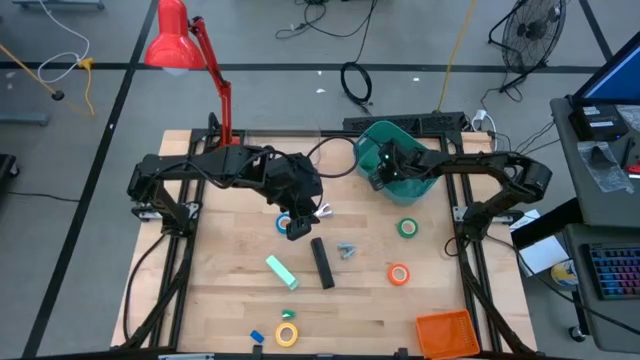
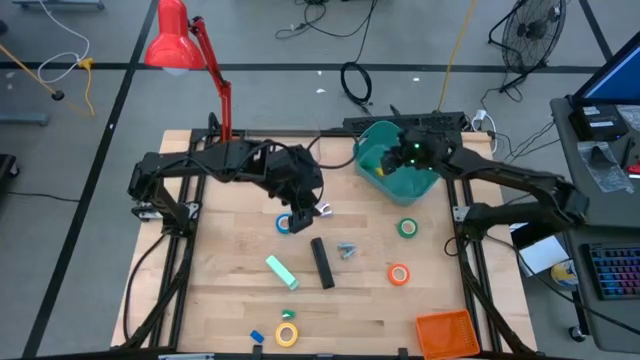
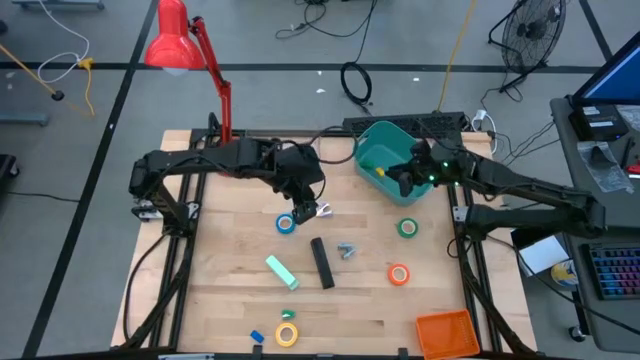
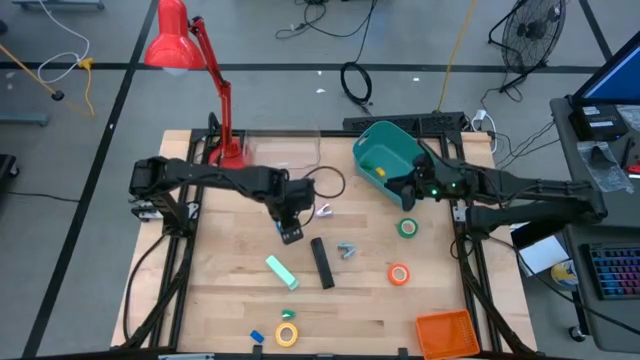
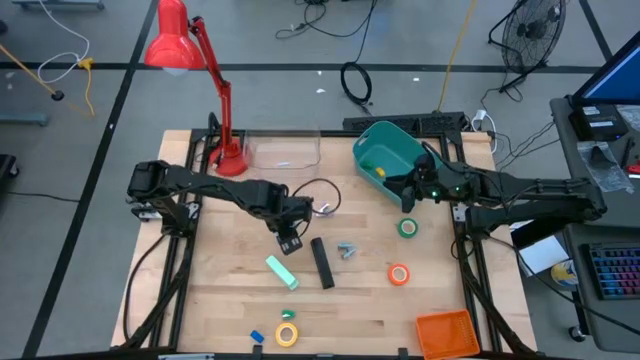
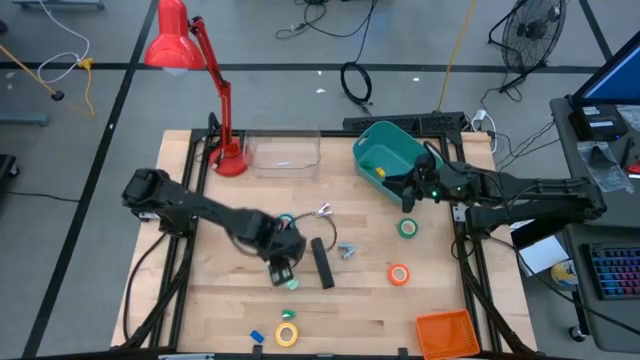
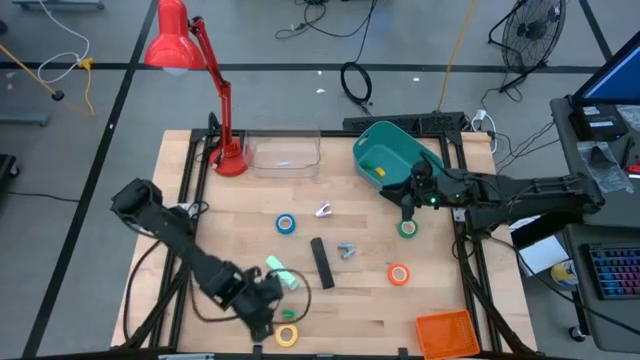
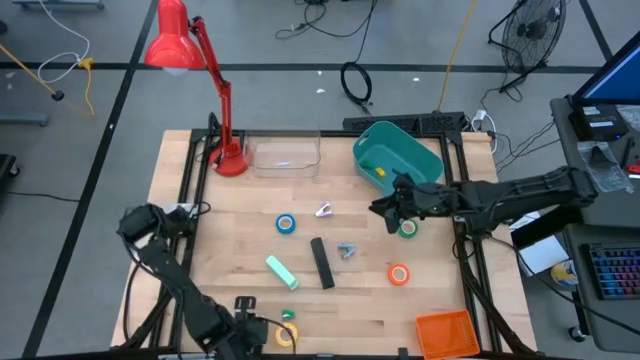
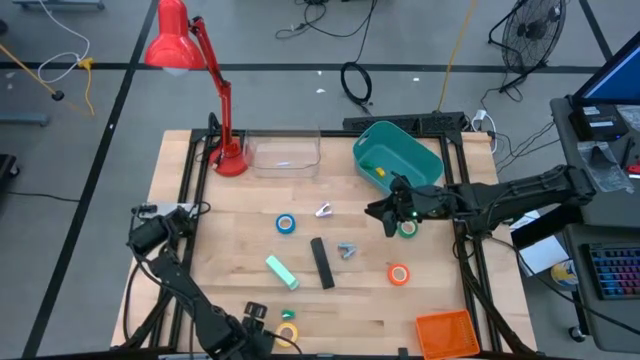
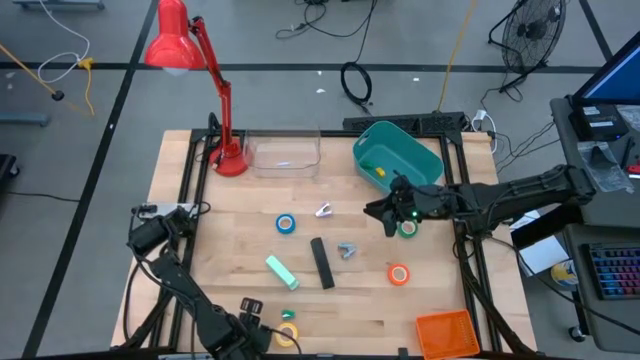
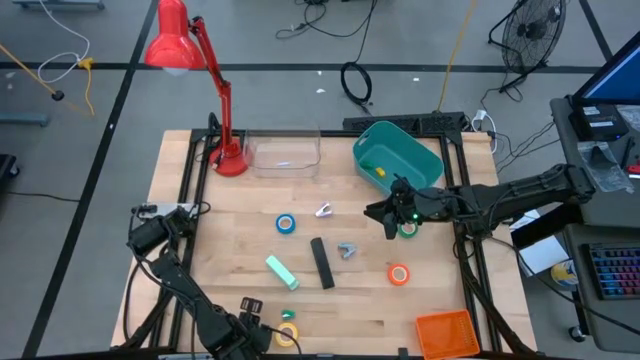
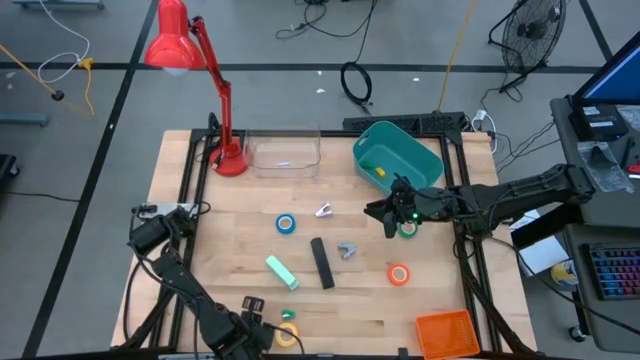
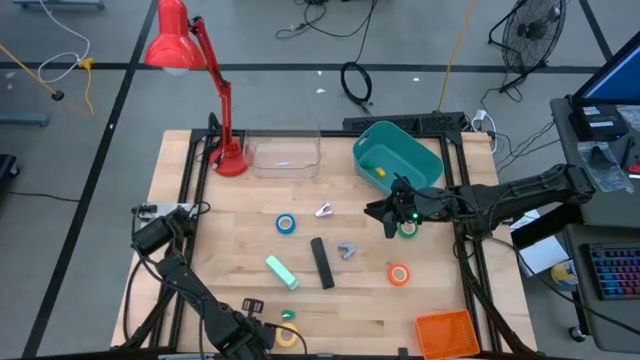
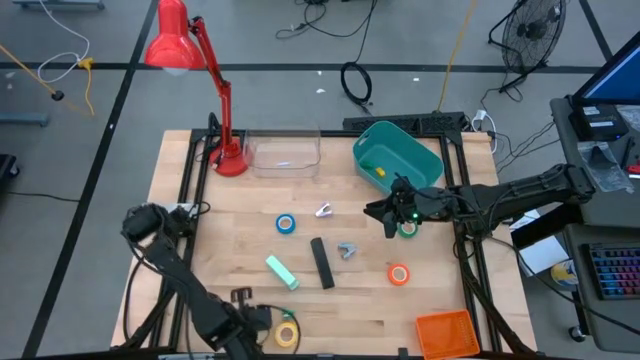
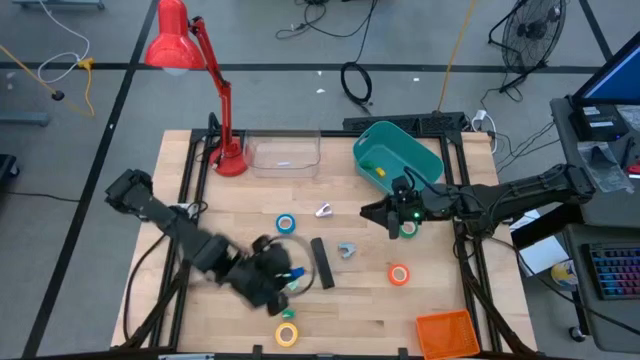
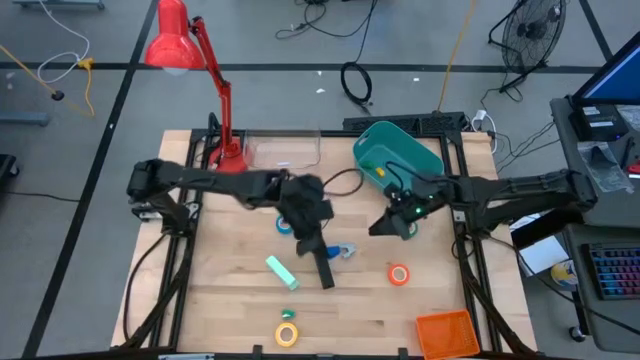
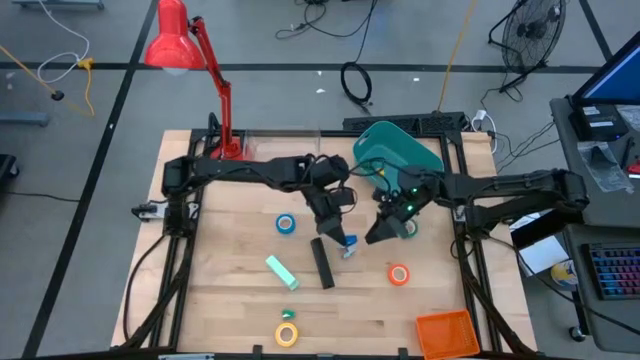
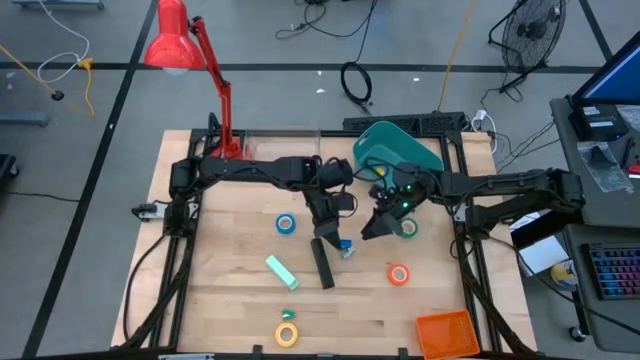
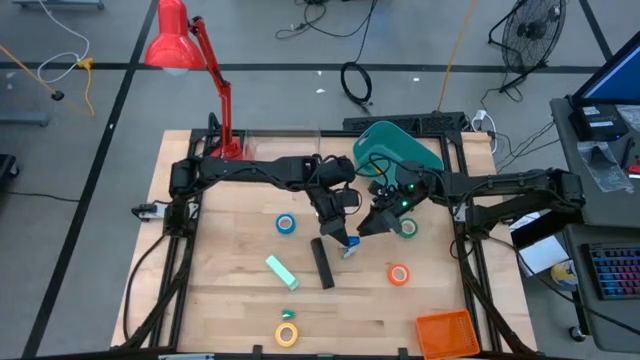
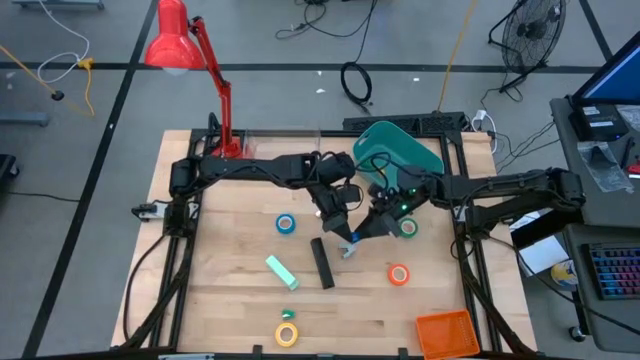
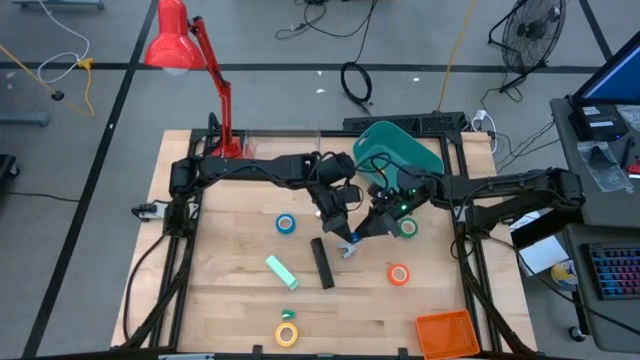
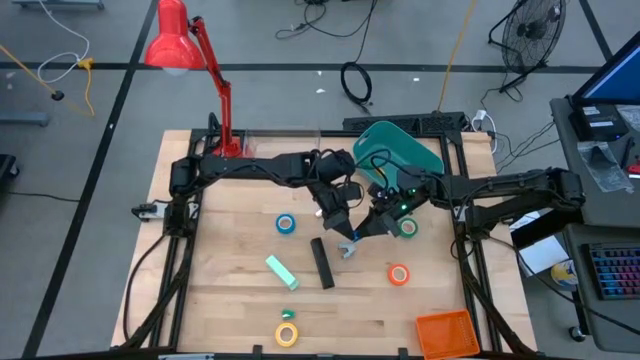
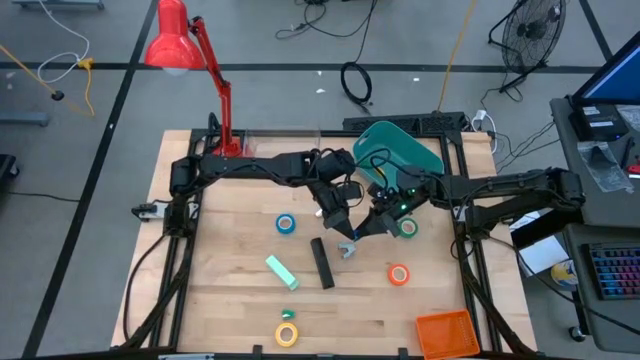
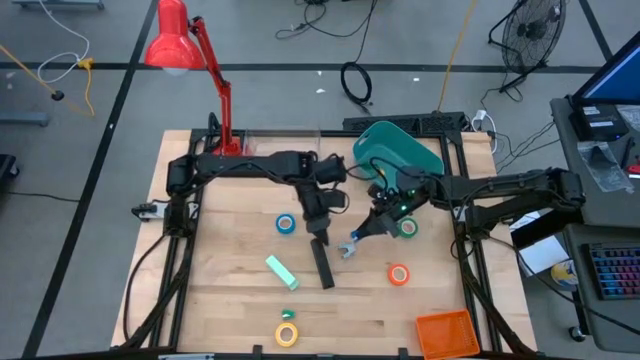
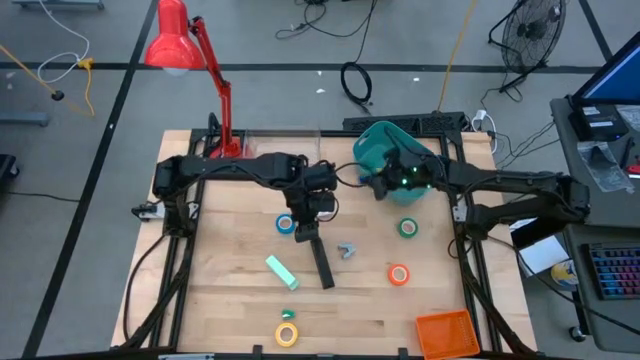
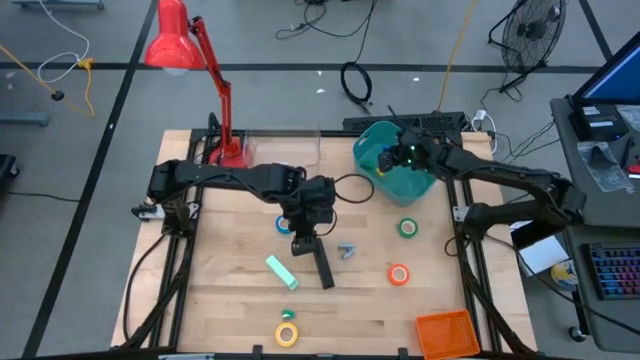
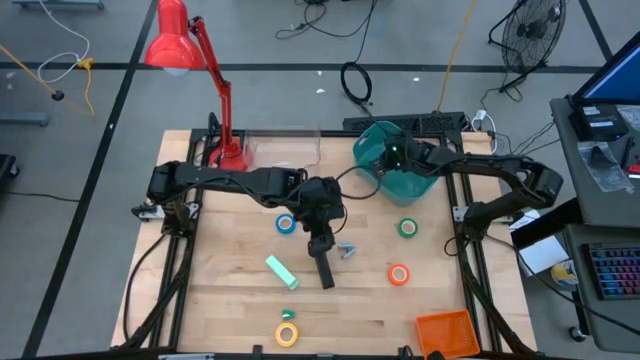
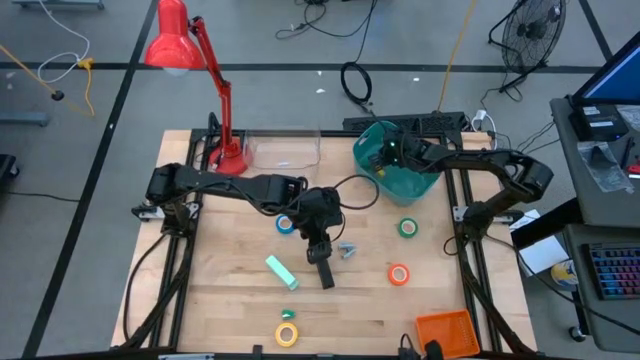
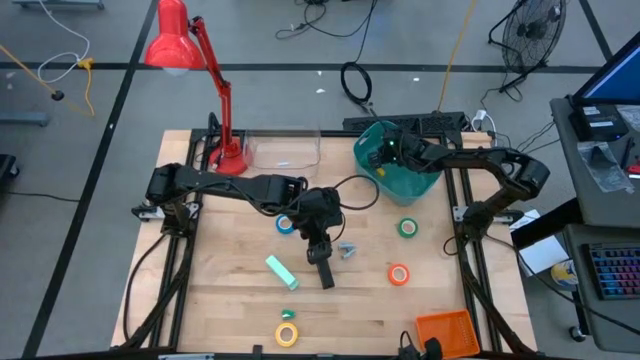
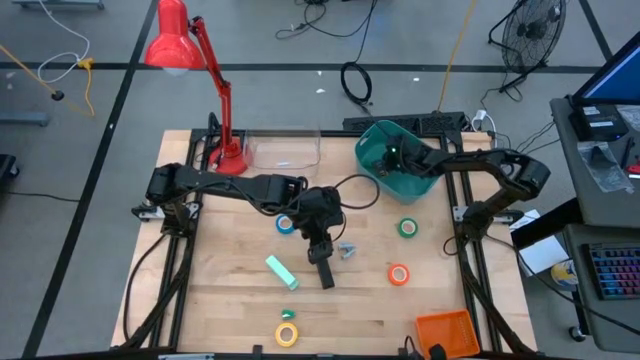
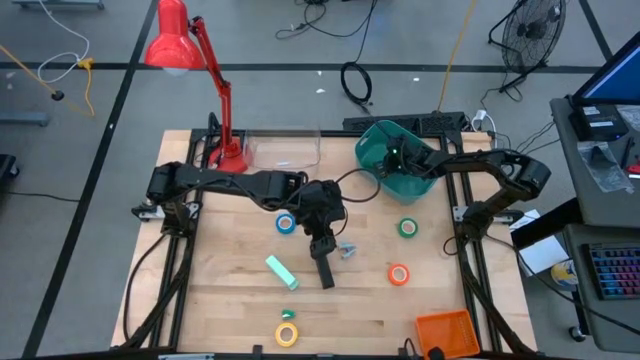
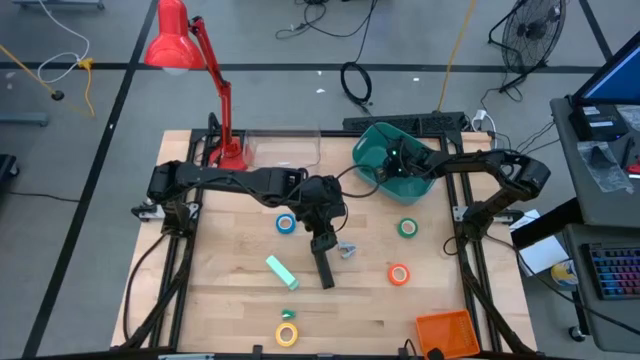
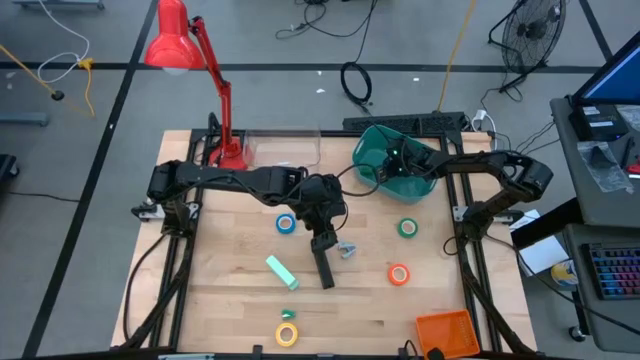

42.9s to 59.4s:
Task: Pick and place Stapler, Stapler remover, tape
Put the blue stapler into the green bin

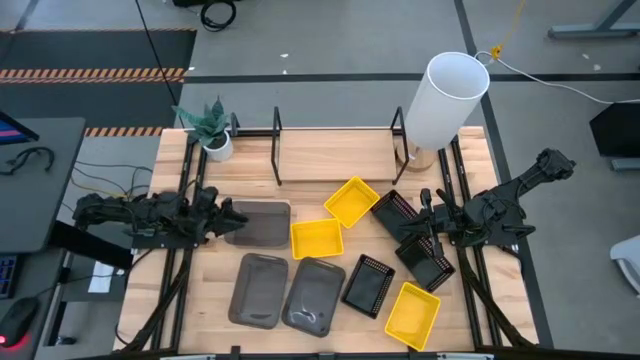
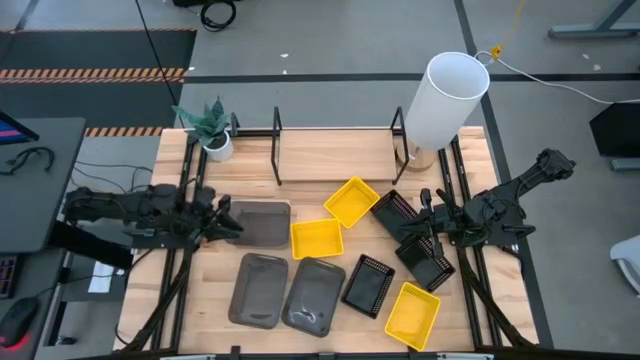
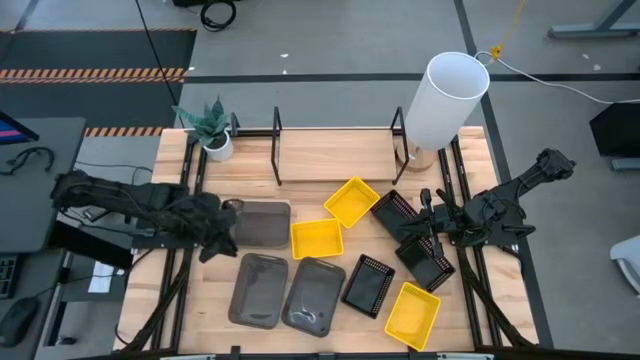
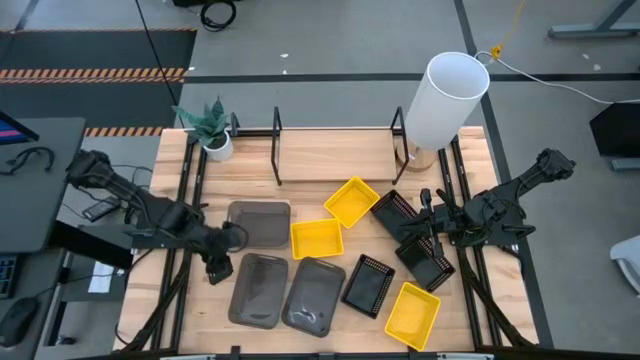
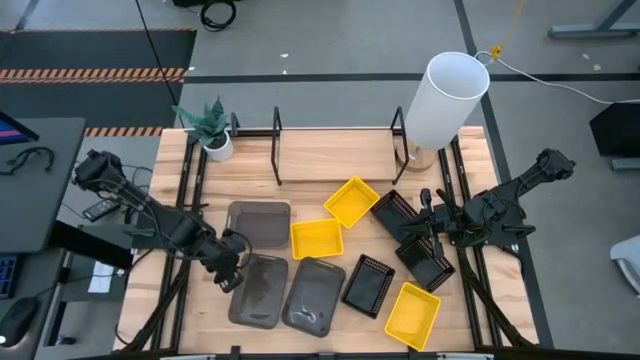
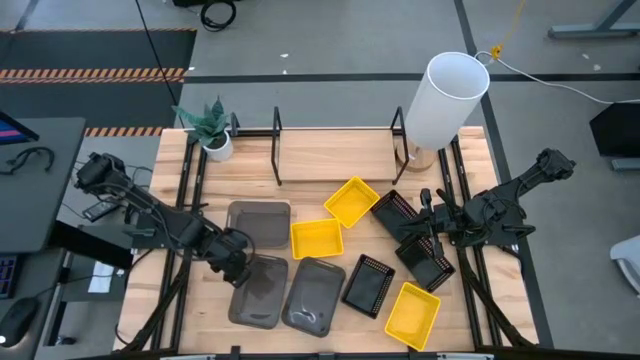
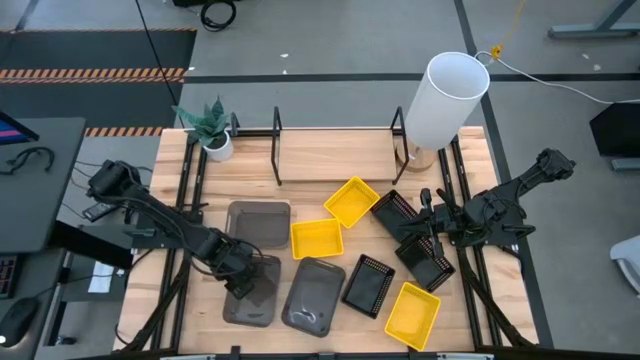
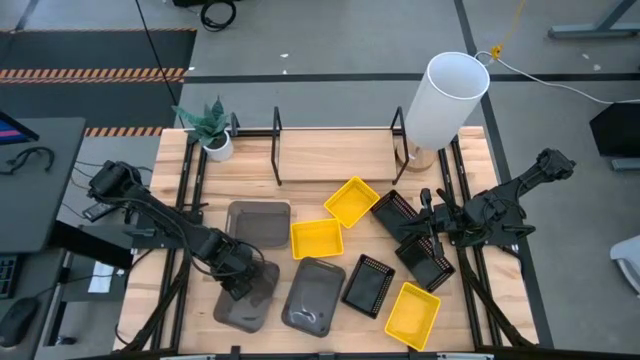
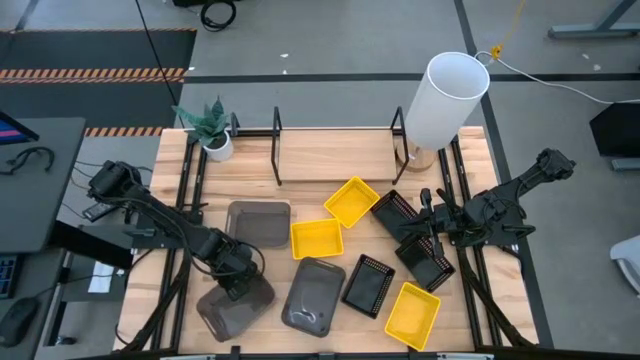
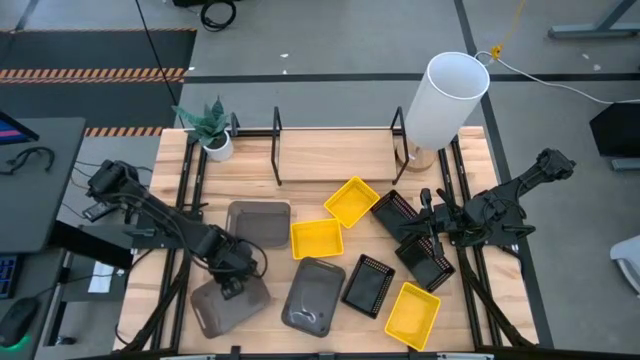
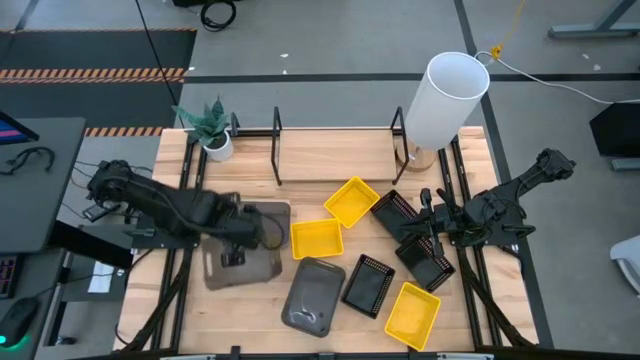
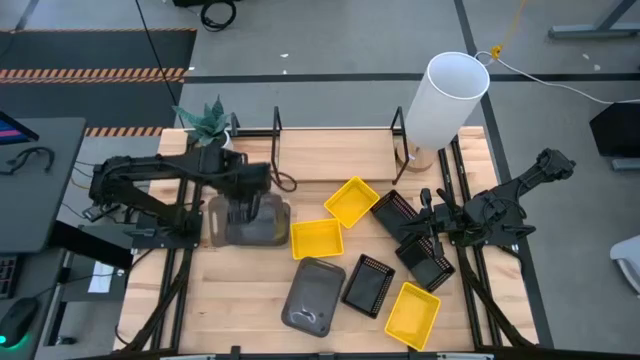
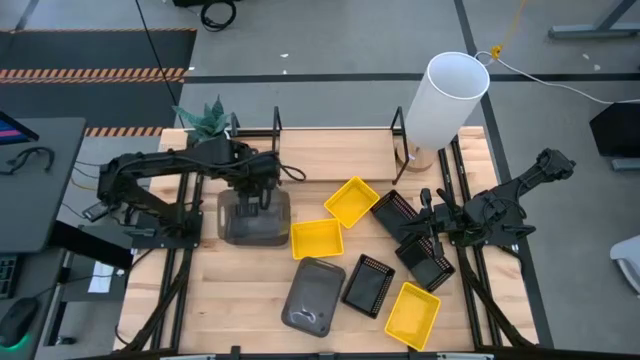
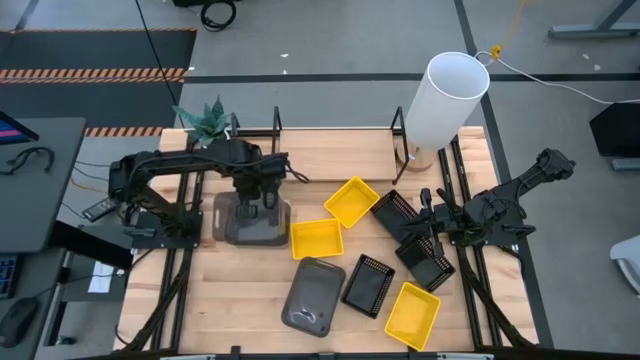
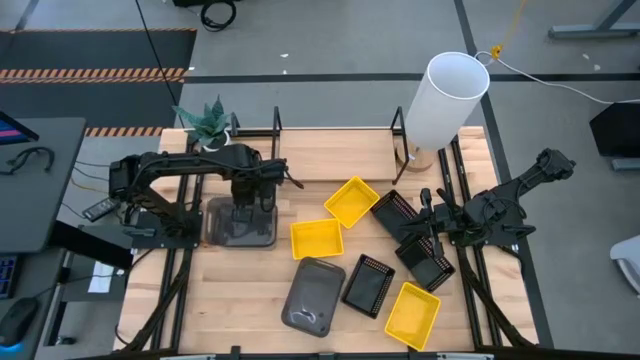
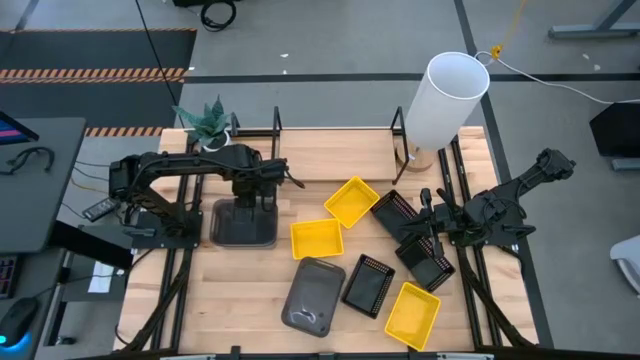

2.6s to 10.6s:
Task: Stack baskets on shelf by color
Stack the middle transparent black bin on top of the top transparent black bin
